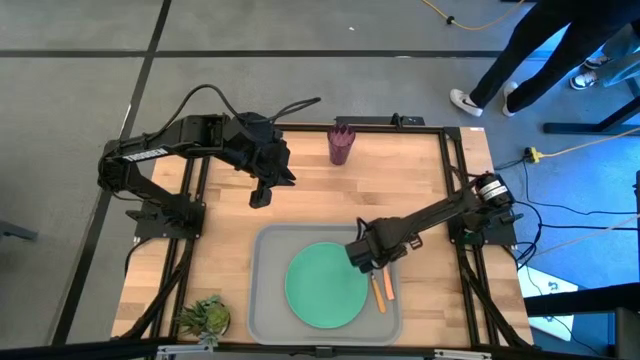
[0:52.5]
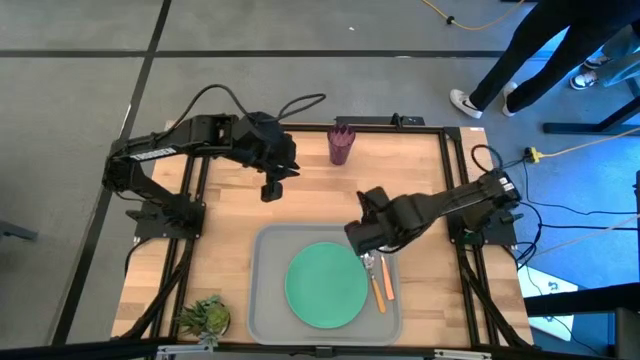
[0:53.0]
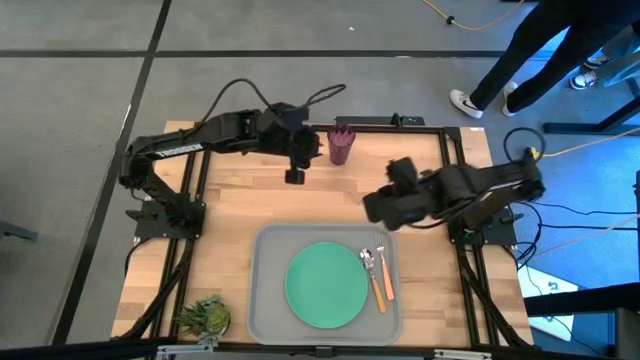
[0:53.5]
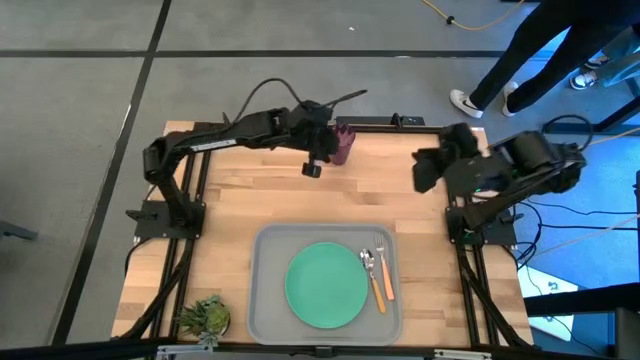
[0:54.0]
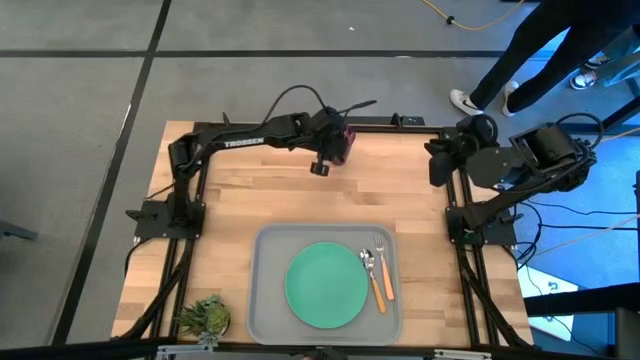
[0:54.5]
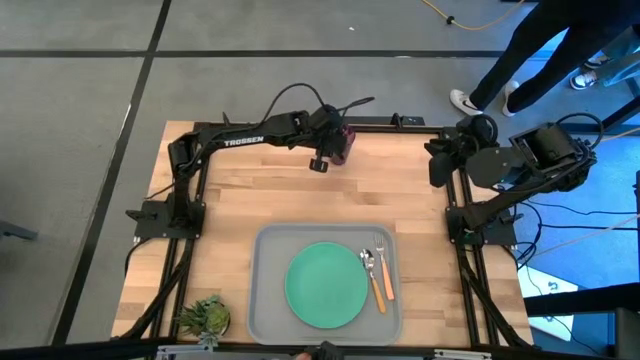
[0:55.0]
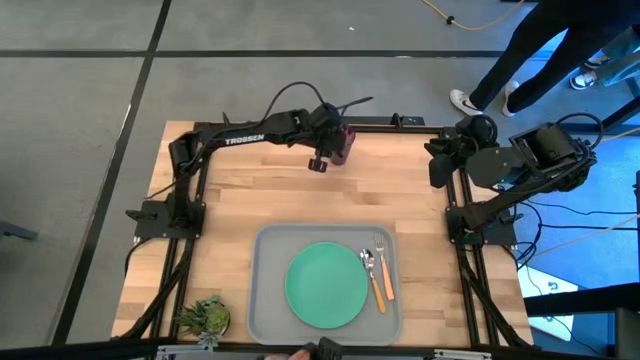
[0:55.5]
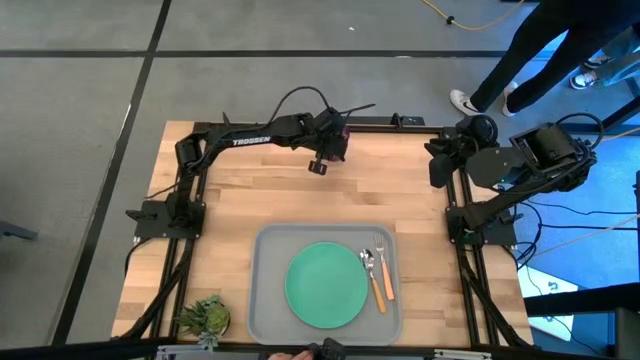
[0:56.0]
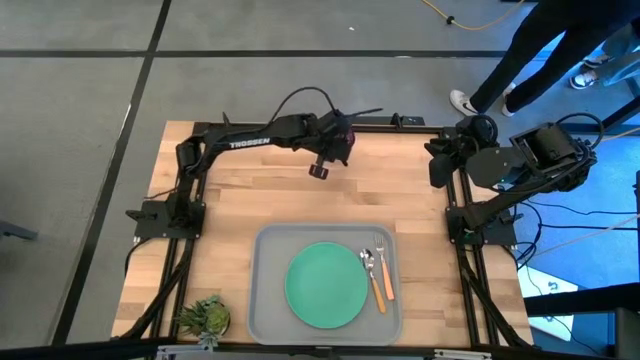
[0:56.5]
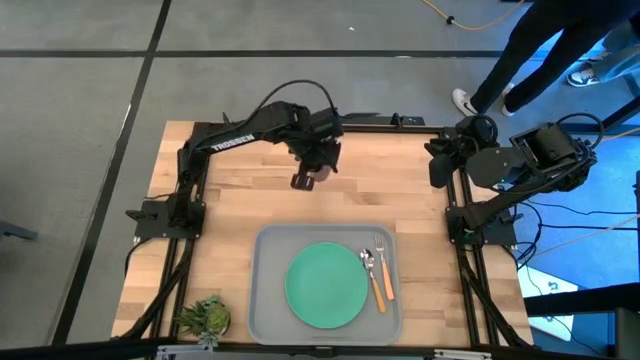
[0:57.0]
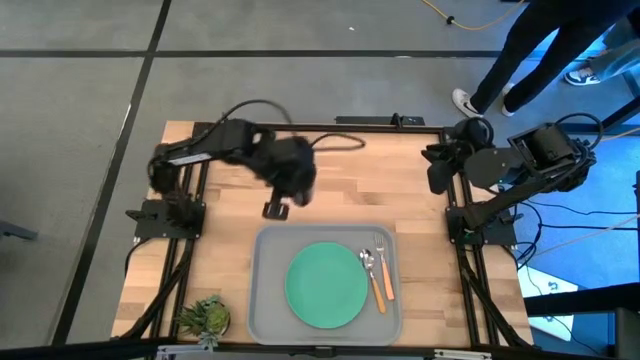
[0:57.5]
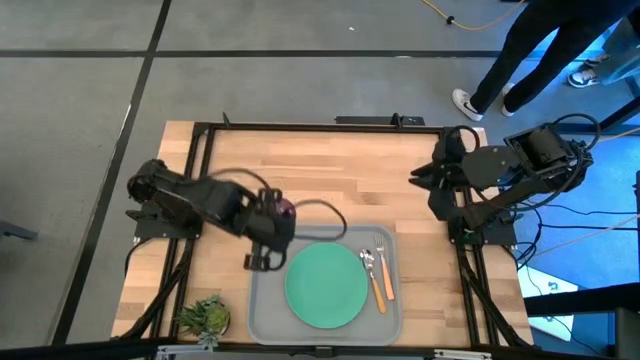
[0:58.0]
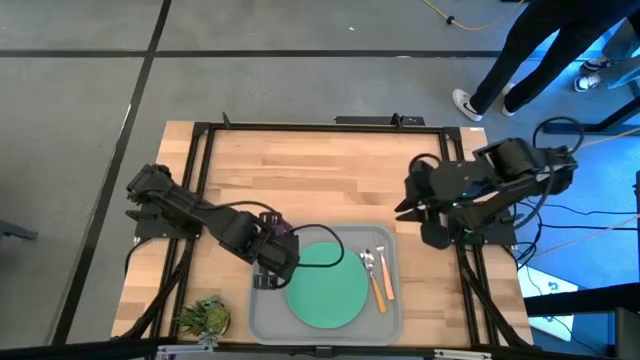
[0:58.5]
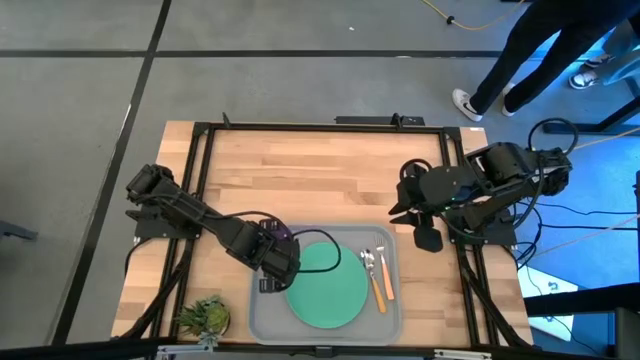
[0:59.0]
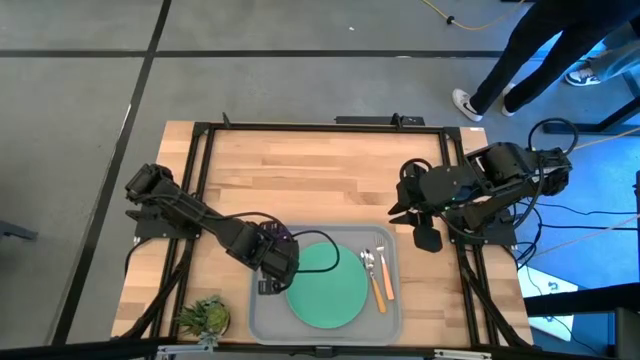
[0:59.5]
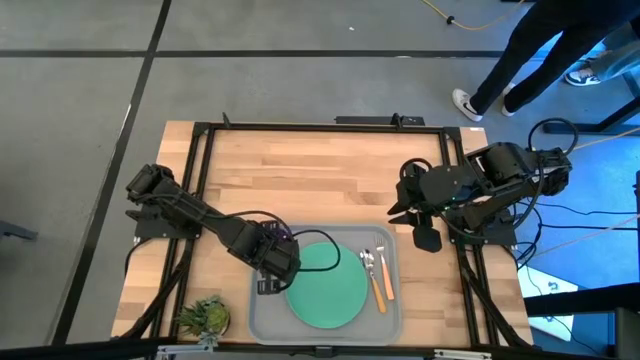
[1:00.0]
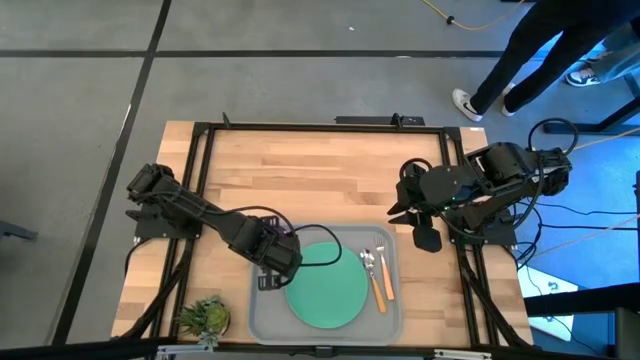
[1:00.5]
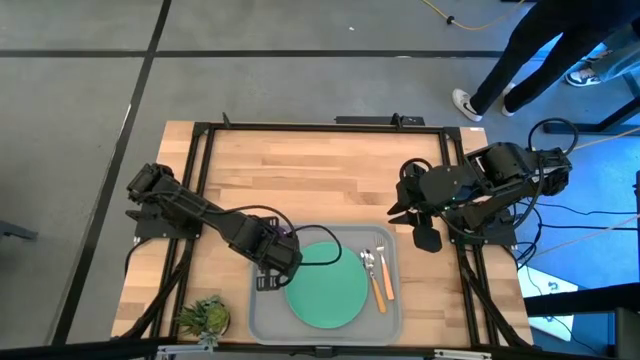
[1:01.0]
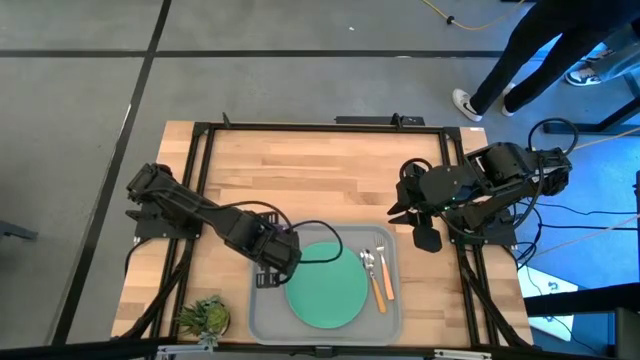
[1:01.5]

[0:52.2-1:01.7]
Task: Pick and place plate/cup/fork/spoon on tray
Put the violet cup on the gray tray to the top left of the green plate

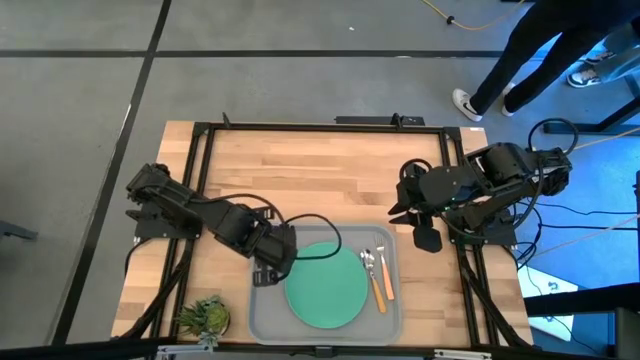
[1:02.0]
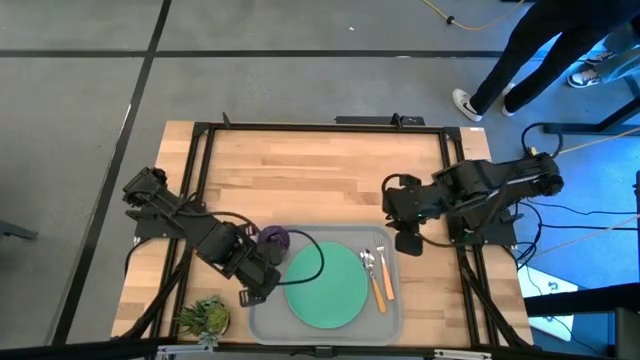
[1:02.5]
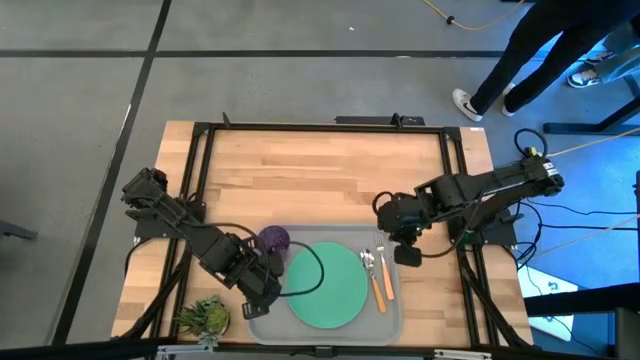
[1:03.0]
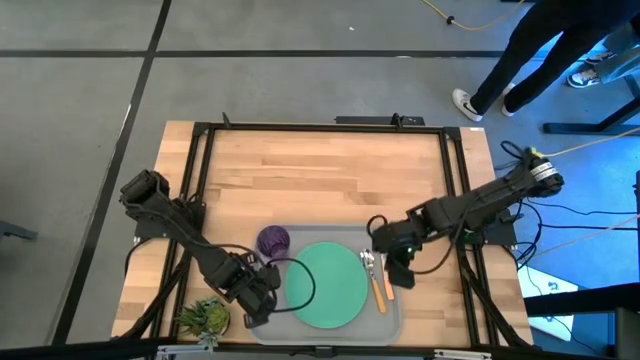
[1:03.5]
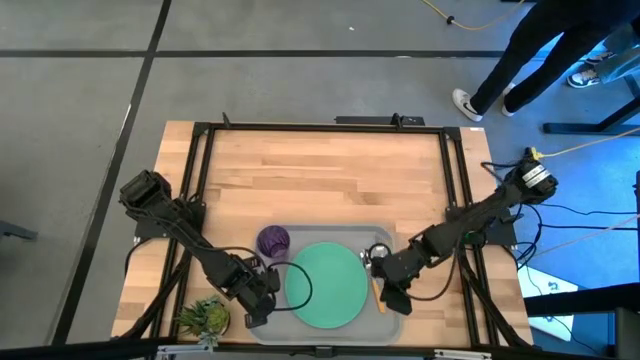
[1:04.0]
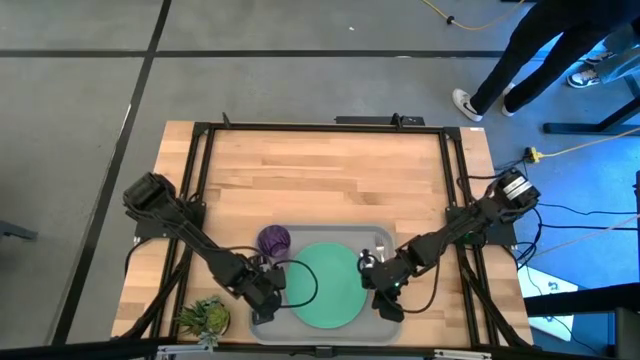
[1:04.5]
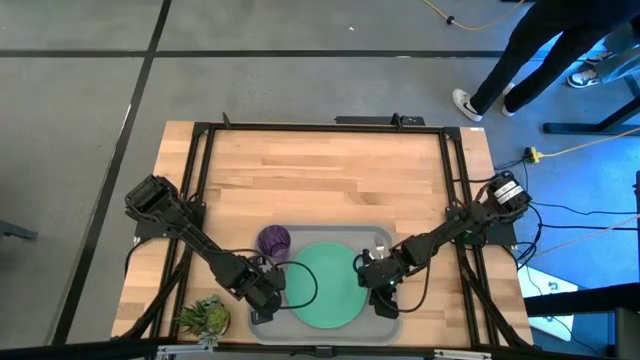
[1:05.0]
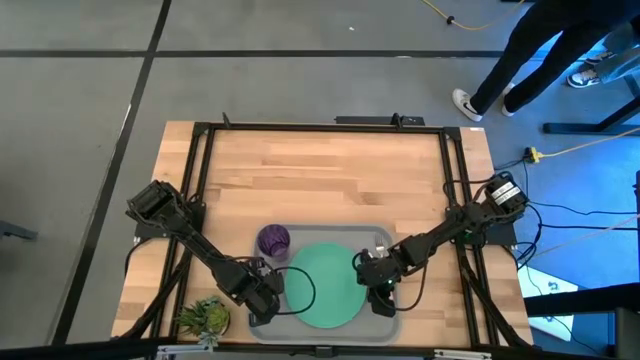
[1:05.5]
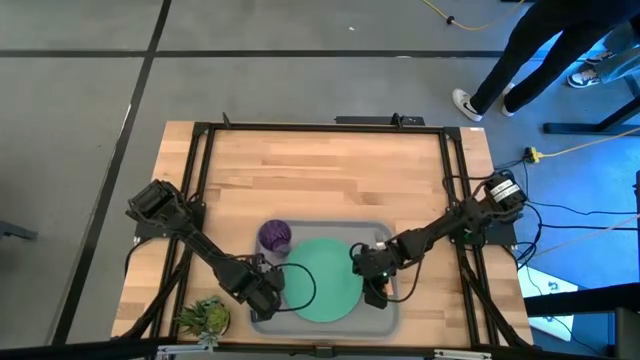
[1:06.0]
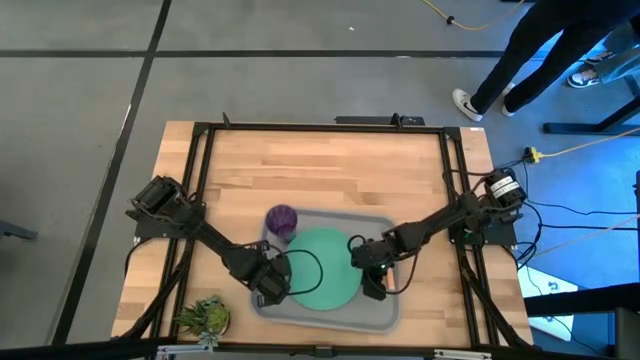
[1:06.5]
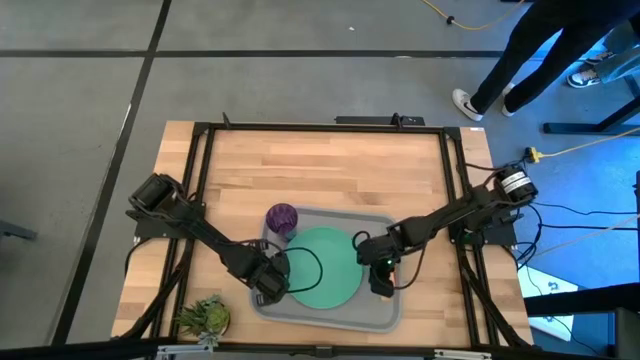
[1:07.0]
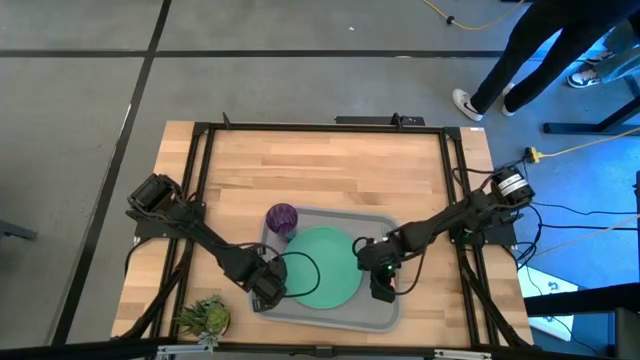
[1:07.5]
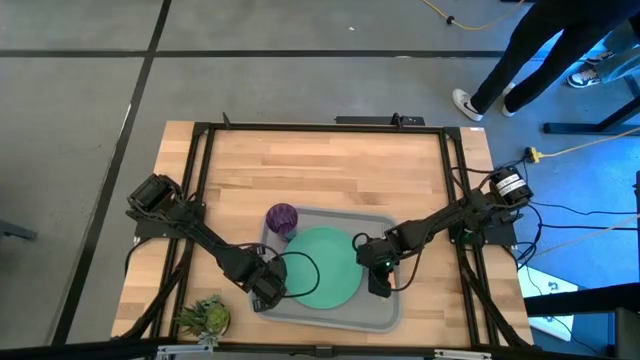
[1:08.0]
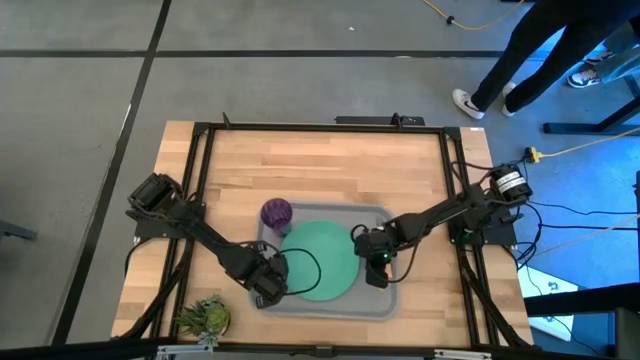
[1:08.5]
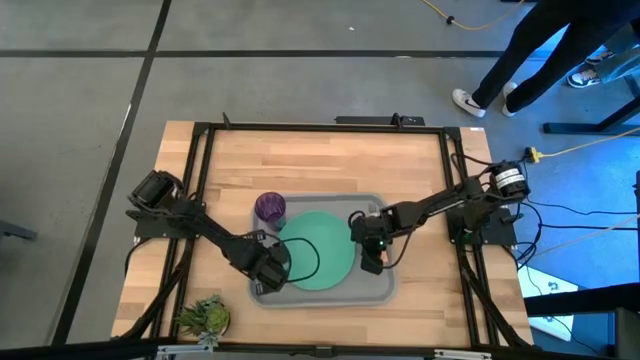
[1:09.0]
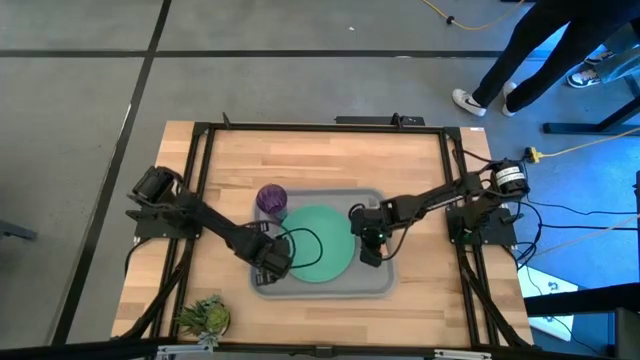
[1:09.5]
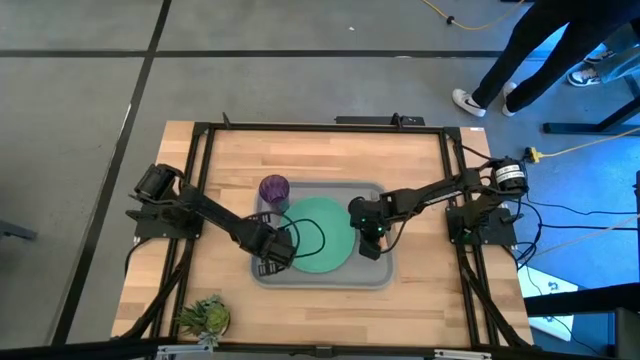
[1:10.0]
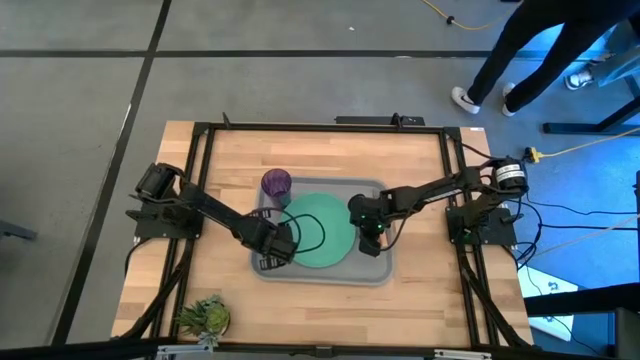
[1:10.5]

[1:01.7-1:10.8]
Move the gray tray to the center of the table

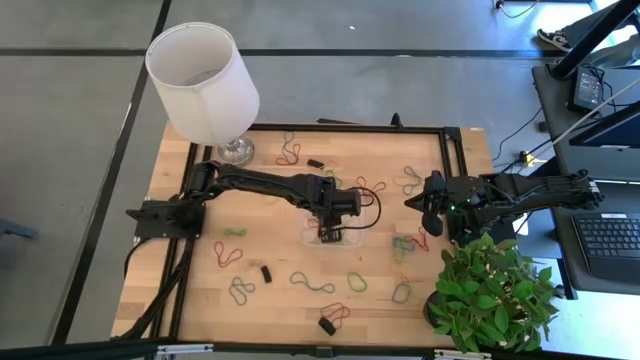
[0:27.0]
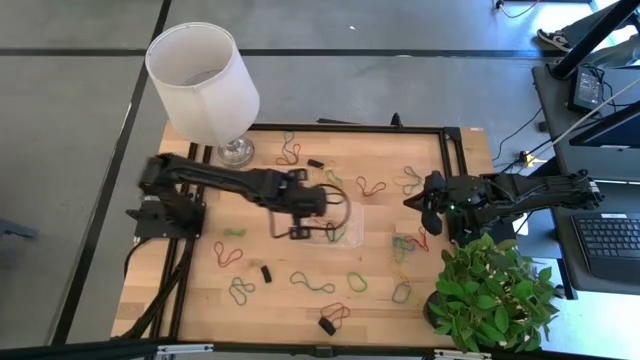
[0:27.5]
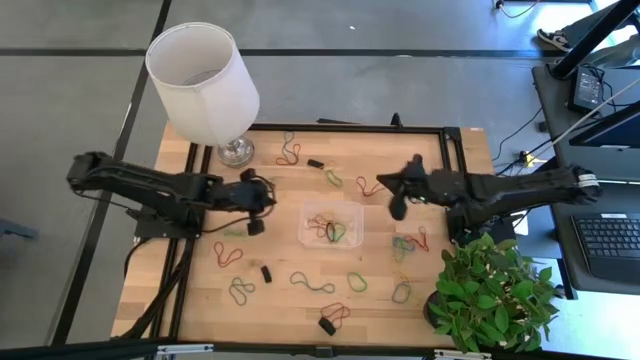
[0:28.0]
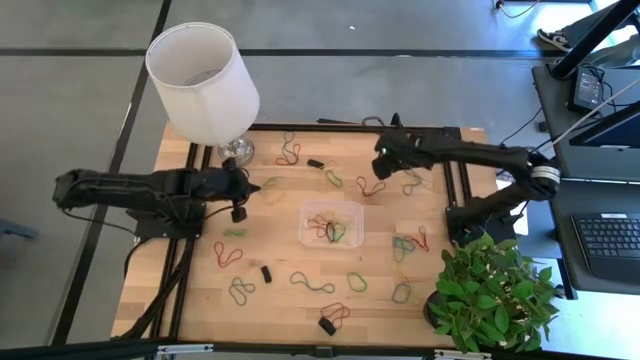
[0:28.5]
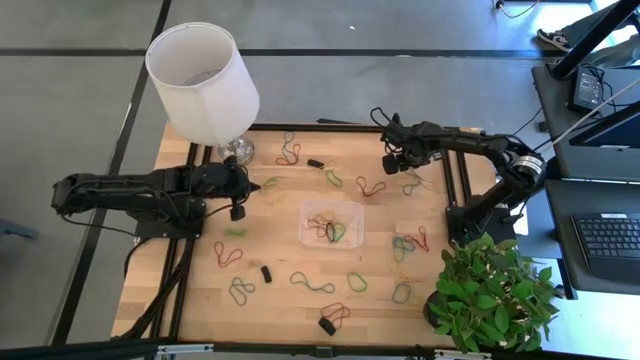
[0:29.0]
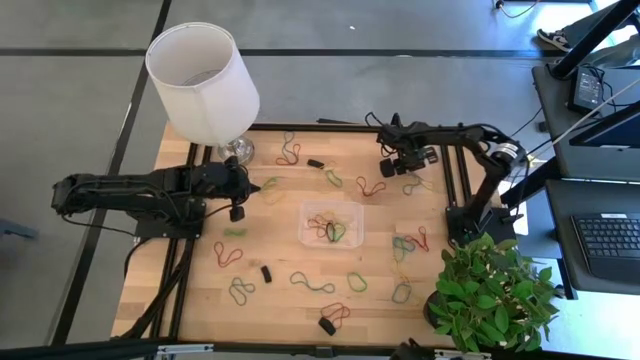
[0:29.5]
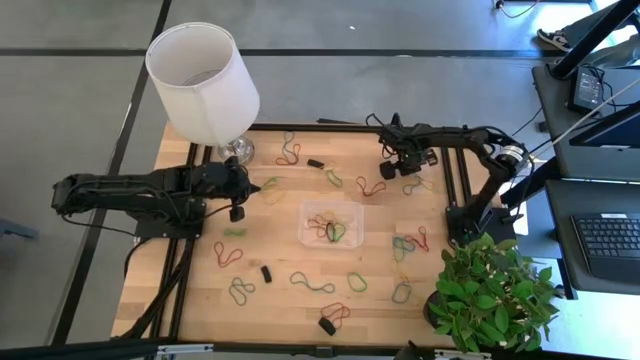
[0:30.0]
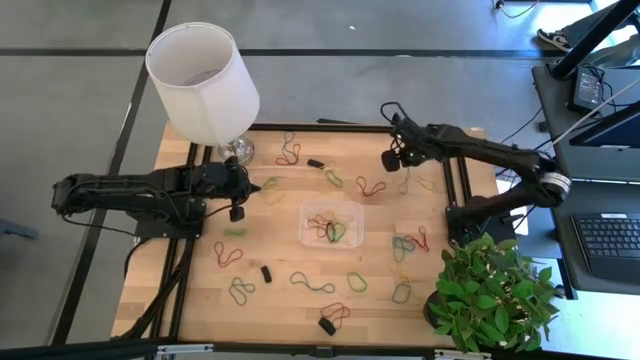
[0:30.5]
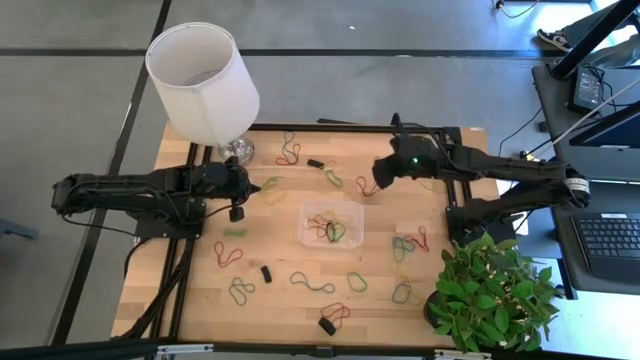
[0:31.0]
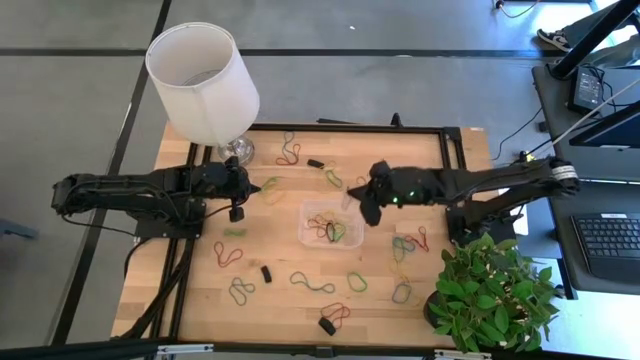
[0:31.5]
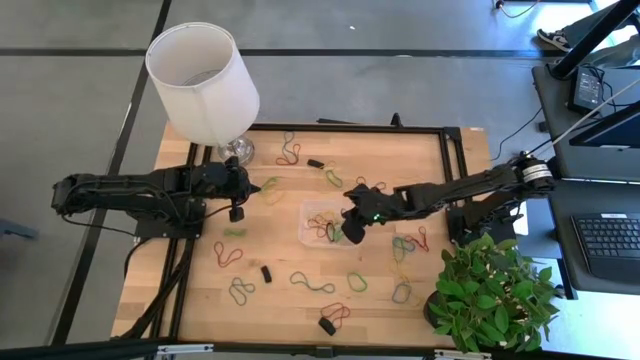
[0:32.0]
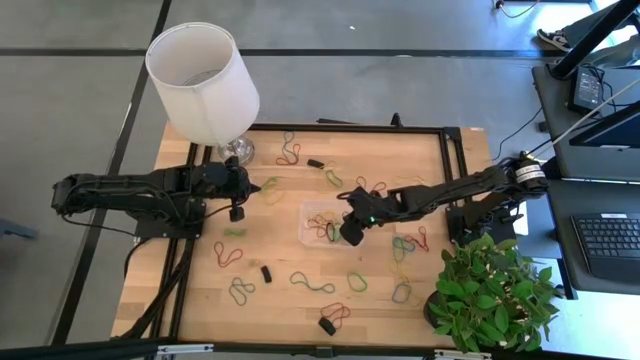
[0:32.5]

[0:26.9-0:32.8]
Task: Pick and place rubber bands into bin
Put the blue rubber band into the transparent bin
